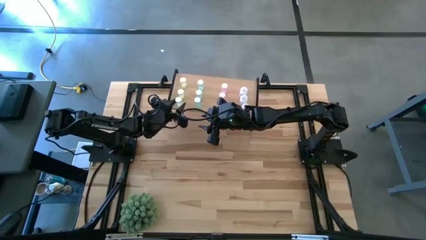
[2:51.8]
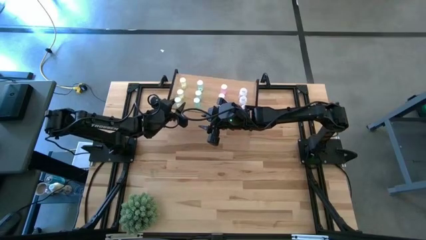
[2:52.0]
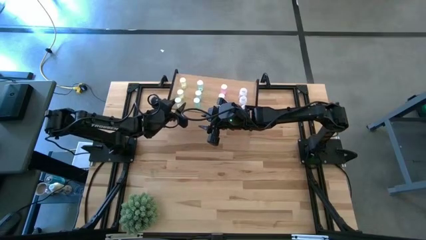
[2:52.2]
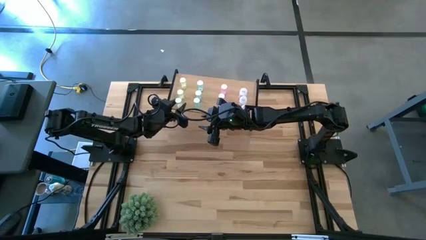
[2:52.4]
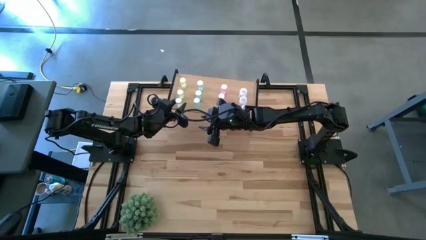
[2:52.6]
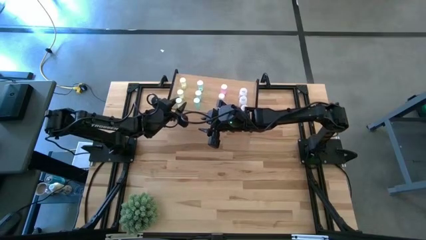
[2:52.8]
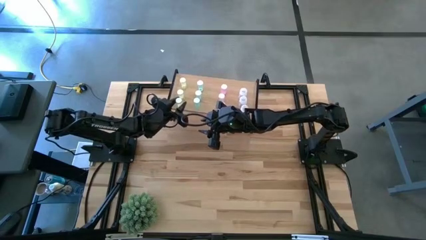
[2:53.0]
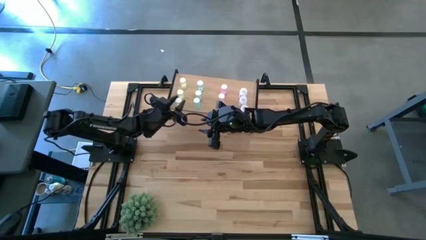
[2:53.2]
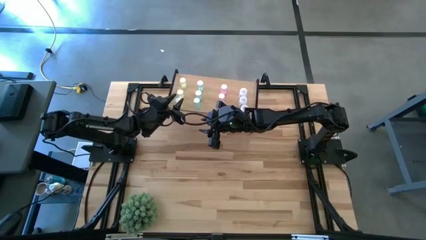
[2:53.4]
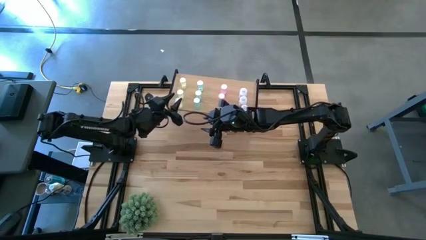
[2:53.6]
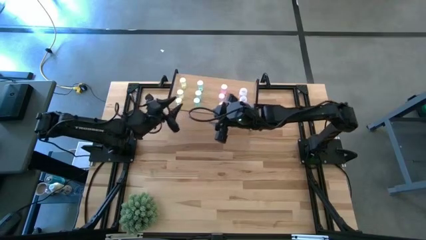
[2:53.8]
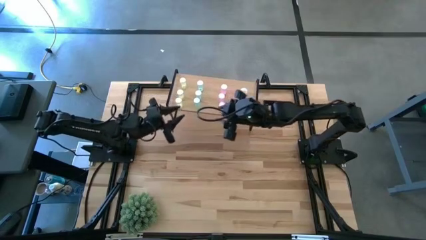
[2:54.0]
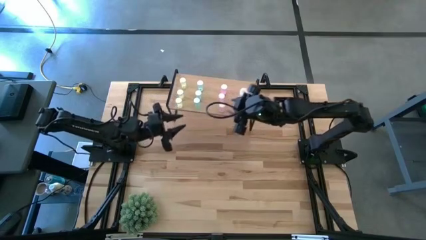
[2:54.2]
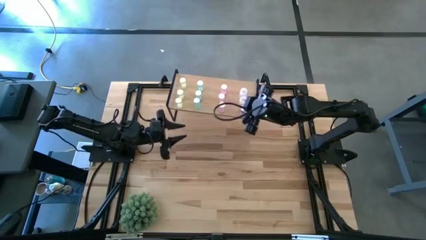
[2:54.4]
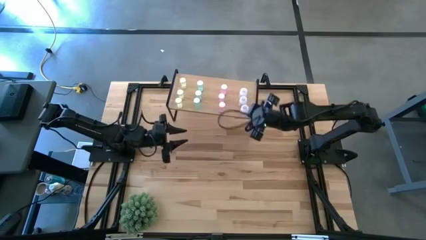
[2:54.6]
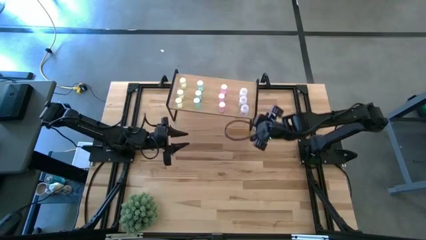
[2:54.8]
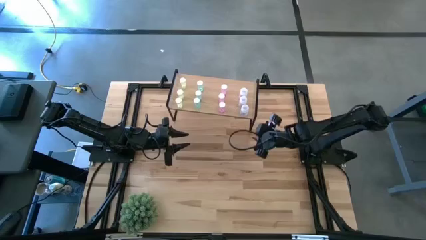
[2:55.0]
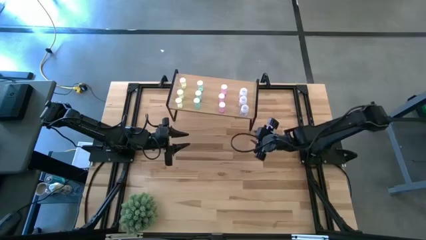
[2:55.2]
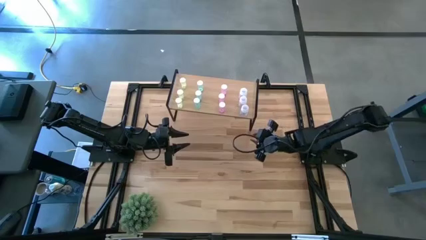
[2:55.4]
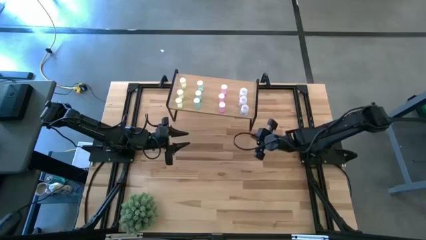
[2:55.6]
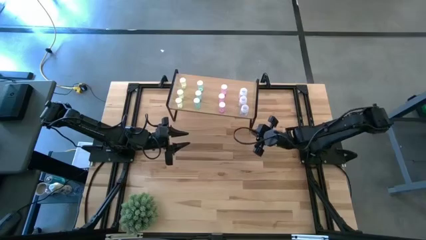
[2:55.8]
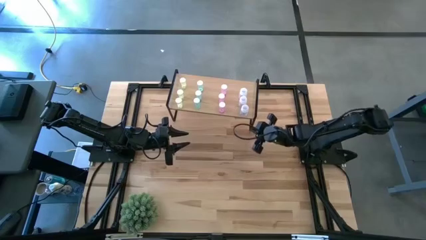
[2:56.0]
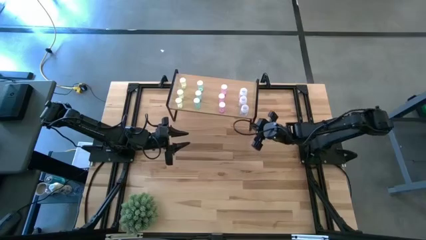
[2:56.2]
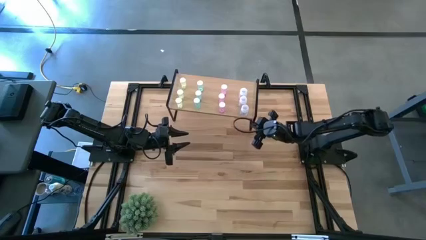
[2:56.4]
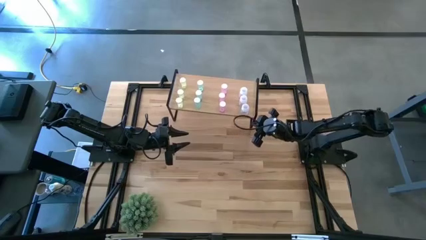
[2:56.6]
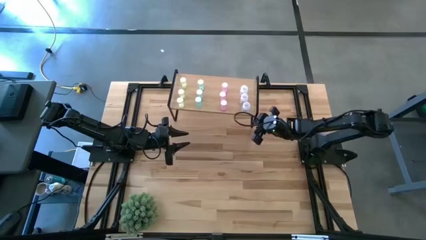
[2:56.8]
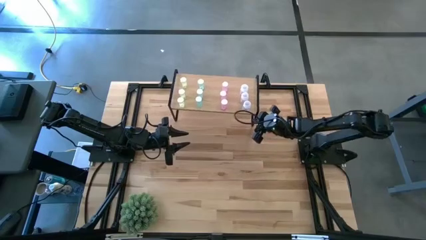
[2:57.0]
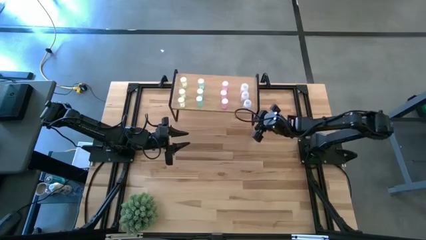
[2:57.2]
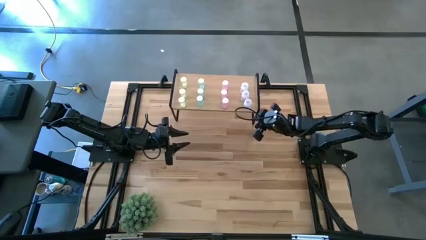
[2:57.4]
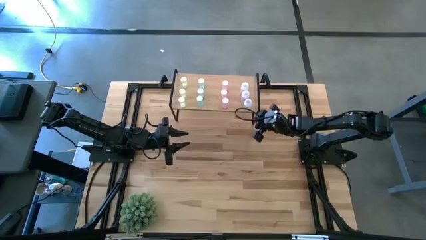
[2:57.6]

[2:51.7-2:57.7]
Task: Pick and place medicine bottles onto shelf by color
Adjust the shelf

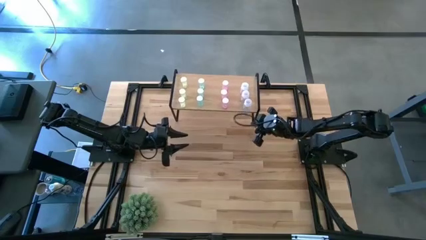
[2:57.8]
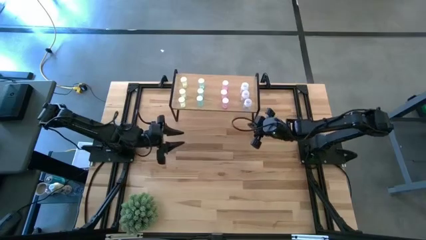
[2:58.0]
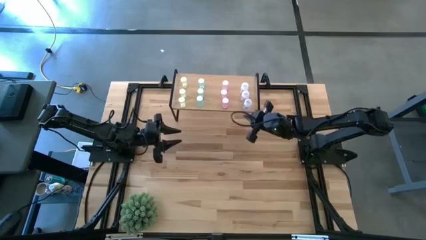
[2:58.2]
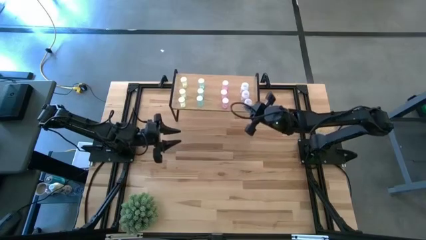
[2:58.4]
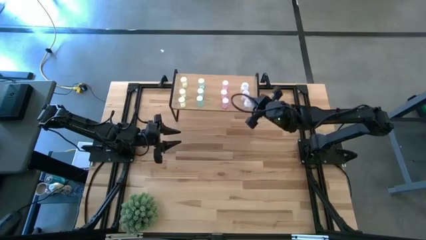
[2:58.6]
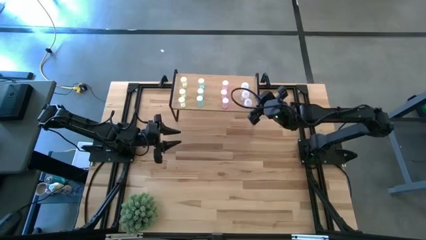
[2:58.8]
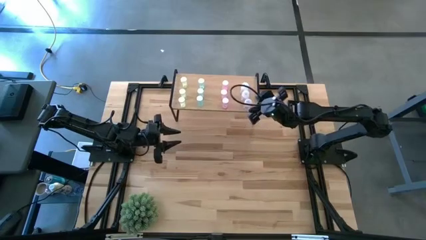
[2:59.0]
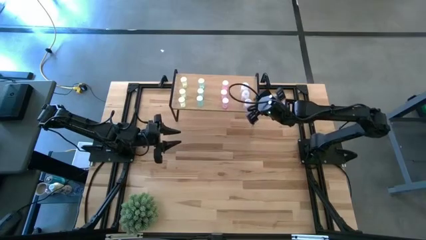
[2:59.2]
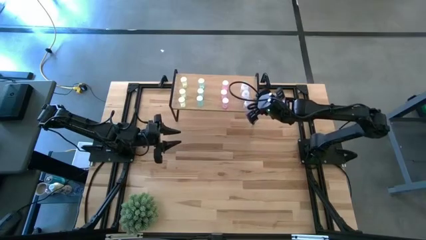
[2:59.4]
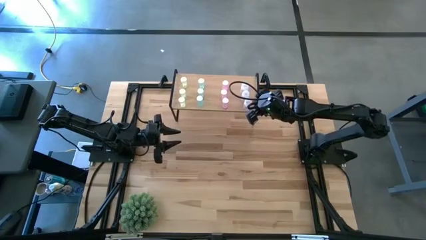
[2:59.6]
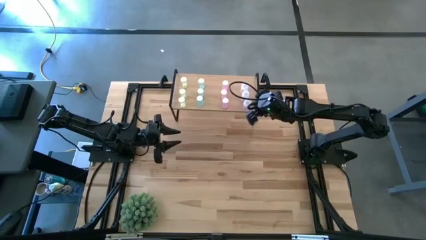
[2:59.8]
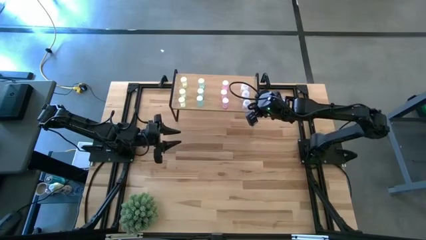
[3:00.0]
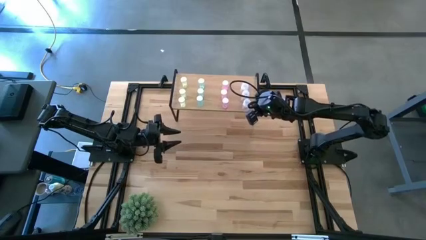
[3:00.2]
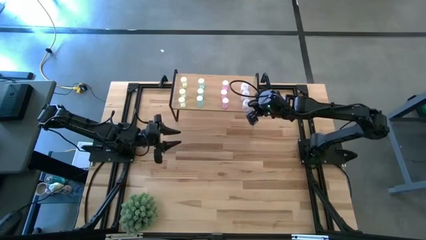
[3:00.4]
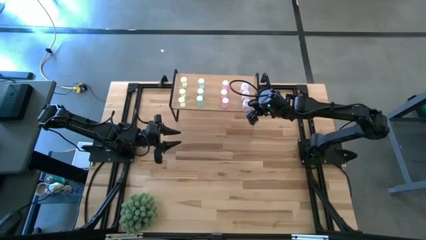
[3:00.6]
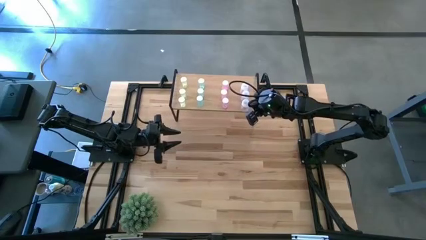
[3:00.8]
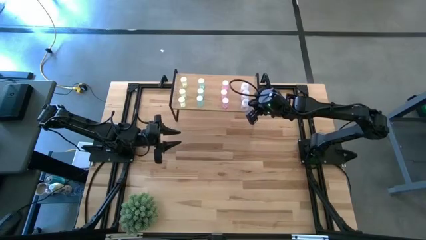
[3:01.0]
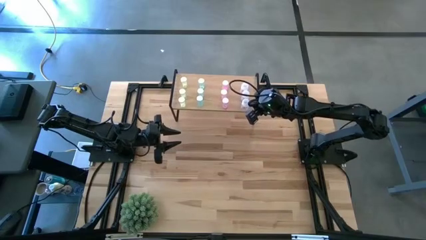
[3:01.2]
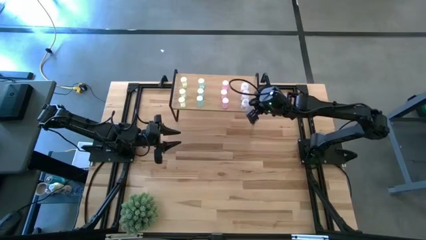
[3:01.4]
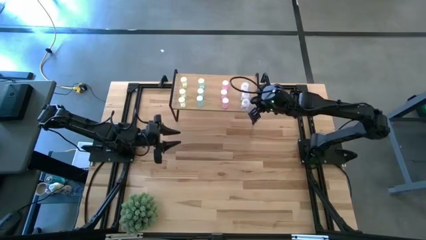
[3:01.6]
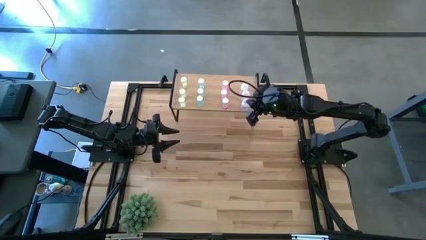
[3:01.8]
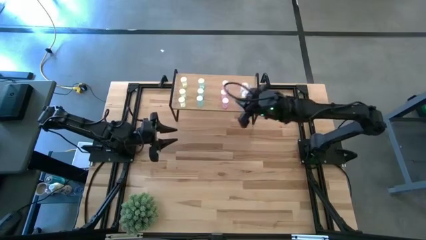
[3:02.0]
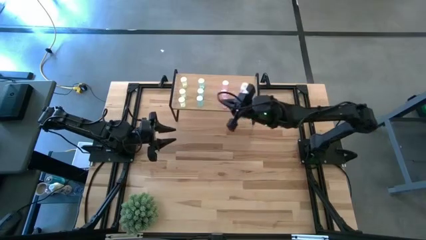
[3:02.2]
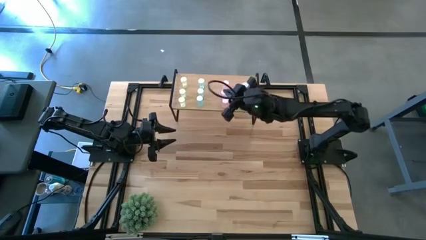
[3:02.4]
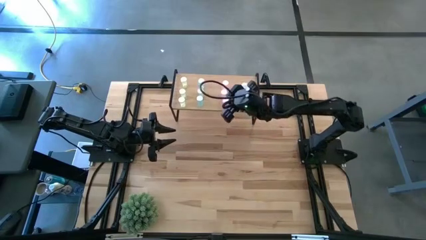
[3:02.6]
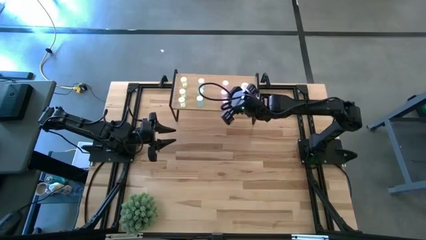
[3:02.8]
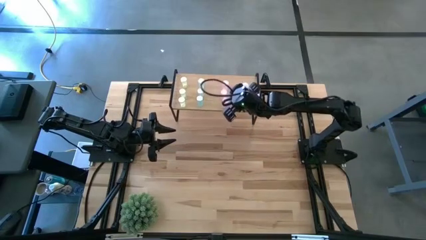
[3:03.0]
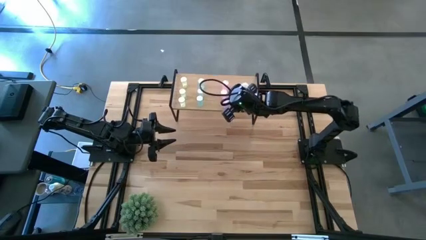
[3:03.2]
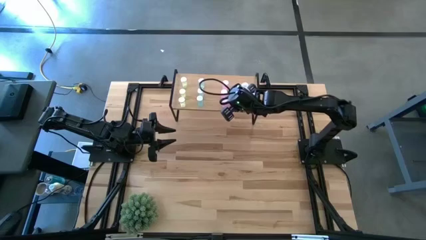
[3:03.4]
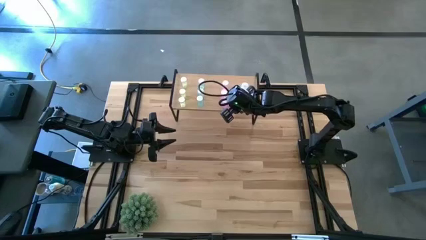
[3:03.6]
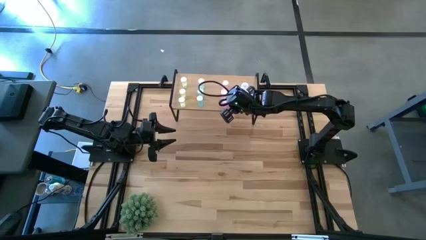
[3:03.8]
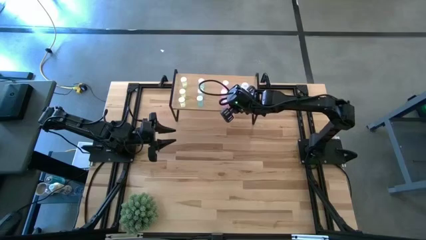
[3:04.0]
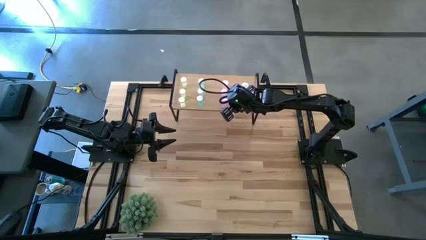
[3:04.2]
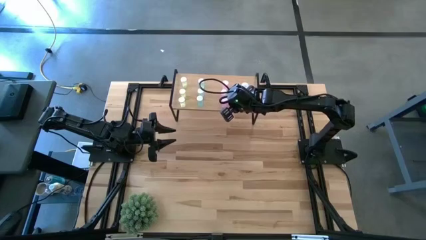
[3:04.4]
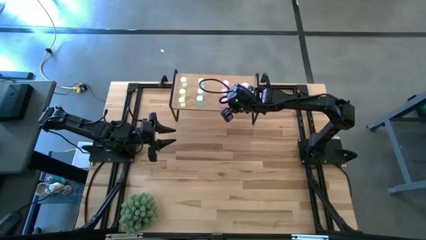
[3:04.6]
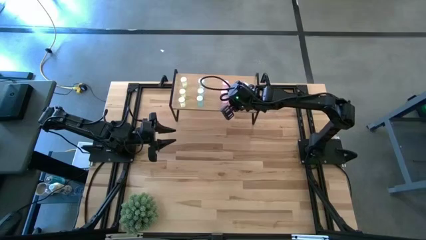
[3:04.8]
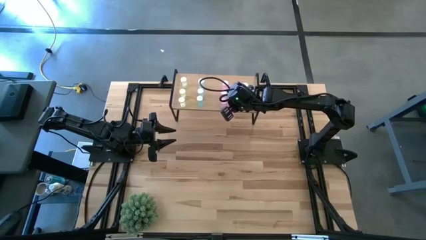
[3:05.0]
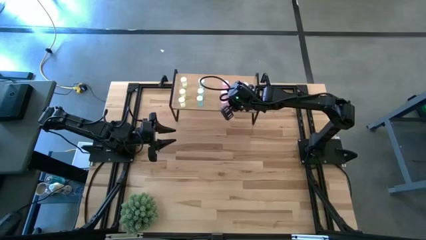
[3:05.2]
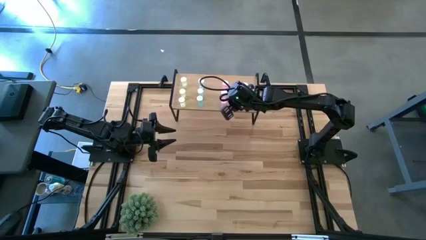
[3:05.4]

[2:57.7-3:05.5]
Adjust the pill bottles on the shelf

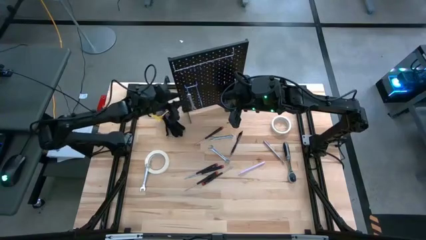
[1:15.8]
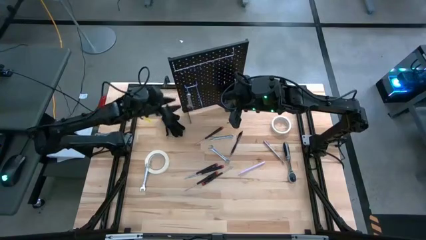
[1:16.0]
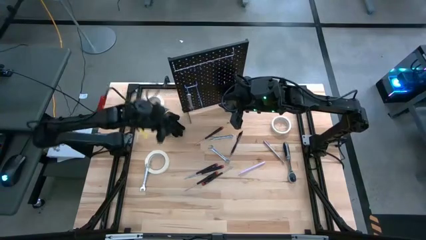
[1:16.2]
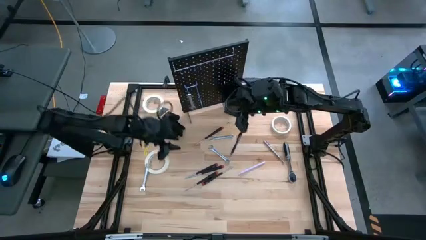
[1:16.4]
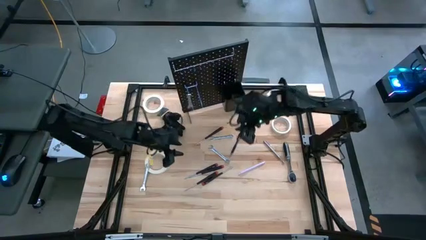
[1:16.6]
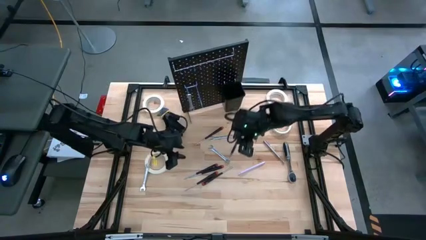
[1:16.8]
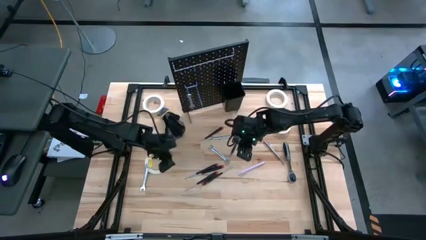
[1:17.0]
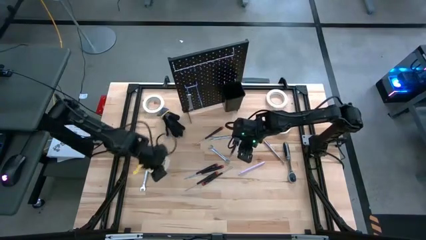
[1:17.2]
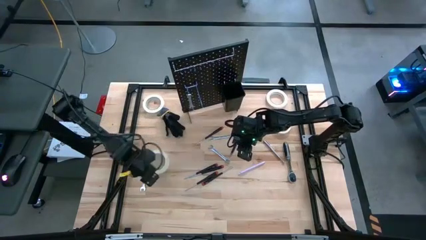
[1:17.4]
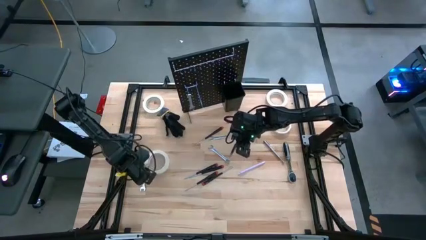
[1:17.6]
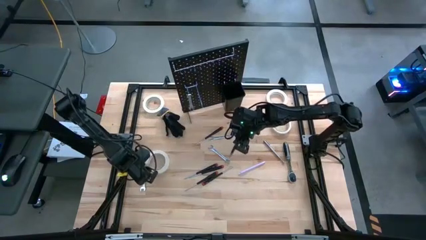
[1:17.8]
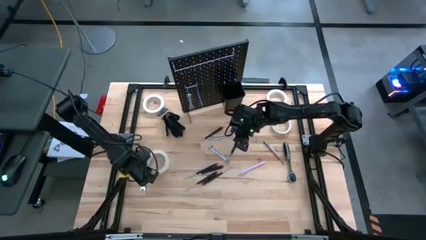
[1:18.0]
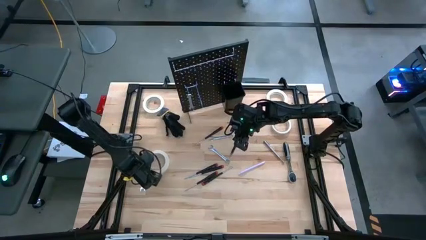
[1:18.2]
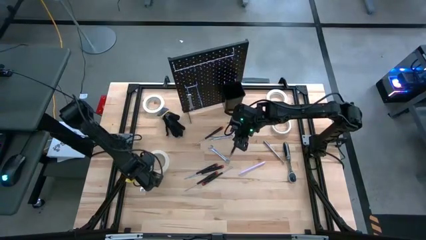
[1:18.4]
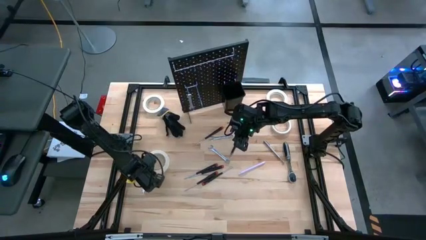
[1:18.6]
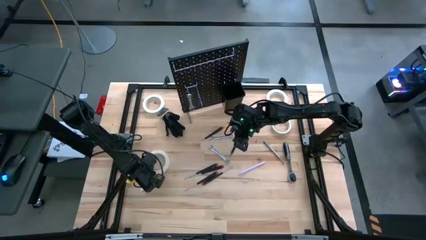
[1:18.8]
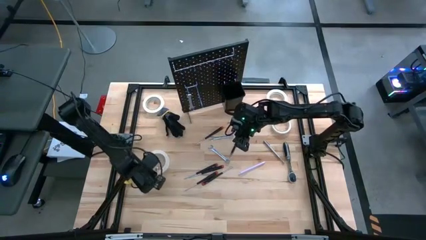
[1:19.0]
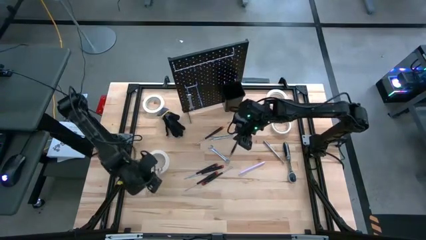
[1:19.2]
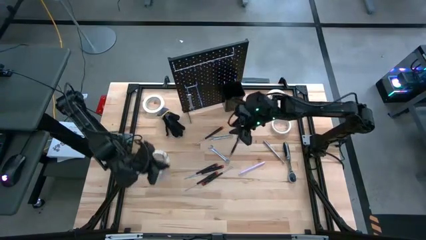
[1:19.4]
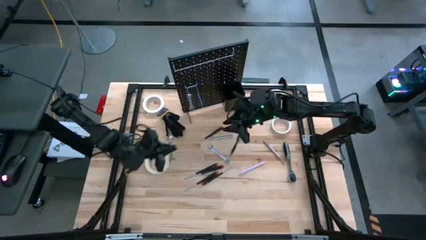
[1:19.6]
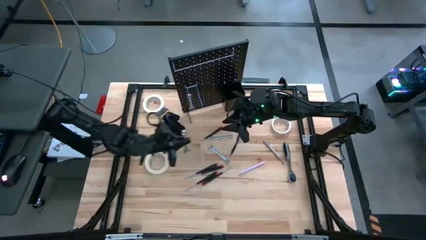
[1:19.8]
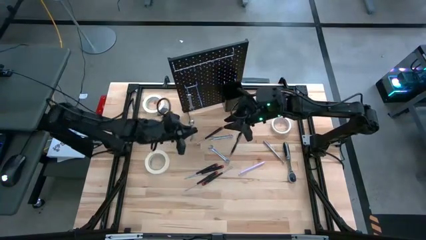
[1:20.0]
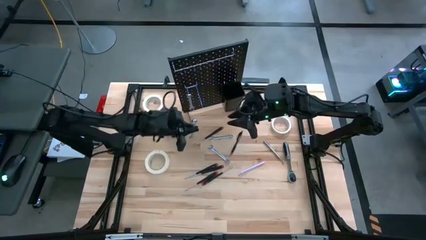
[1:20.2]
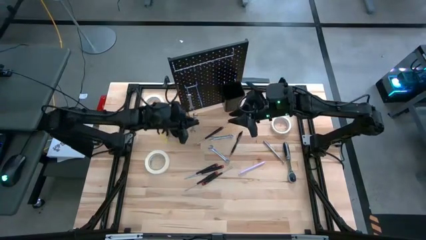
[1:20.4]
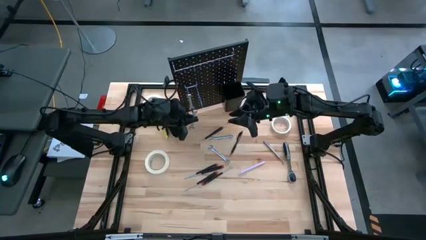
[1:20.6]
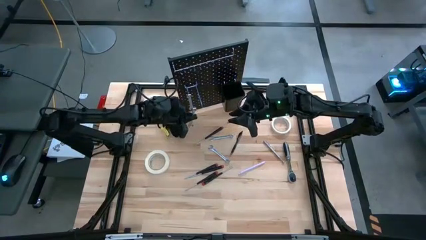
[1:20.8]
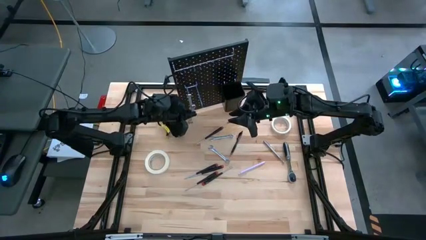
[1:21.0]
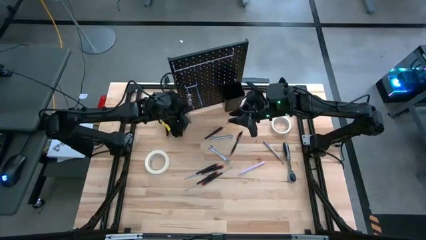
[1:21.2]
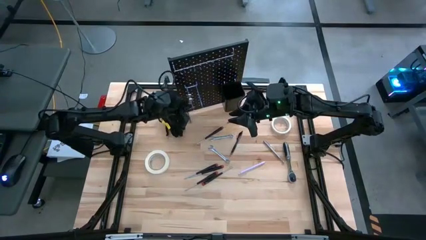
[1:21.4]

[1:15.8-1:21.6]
Task: Hang tools onto peg board
Hang the silver wrench on the peg board
